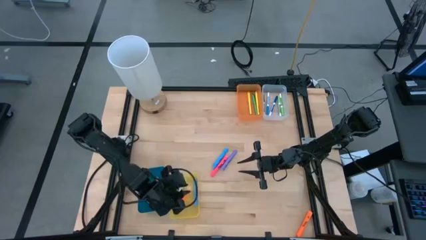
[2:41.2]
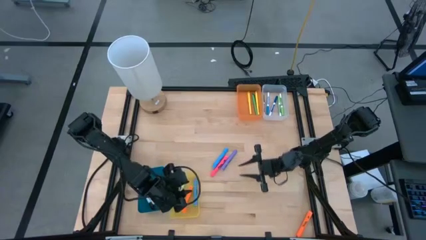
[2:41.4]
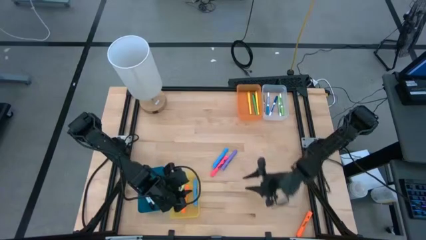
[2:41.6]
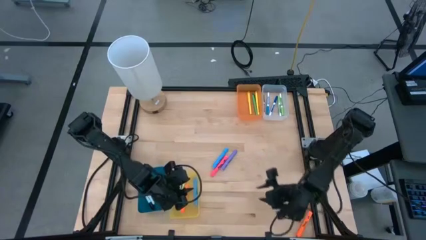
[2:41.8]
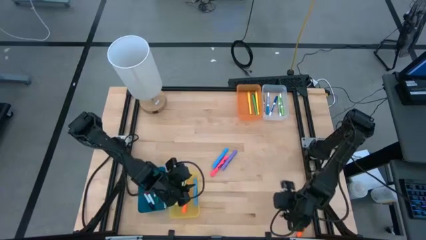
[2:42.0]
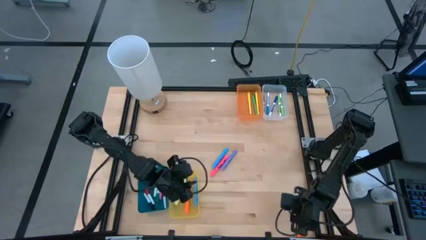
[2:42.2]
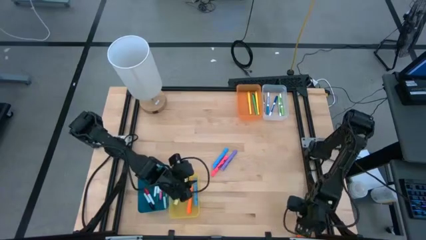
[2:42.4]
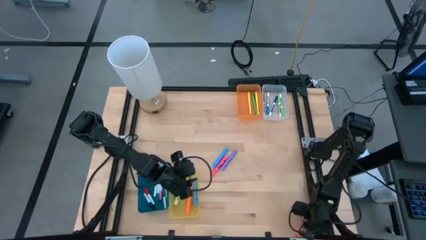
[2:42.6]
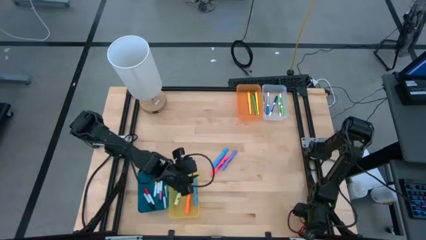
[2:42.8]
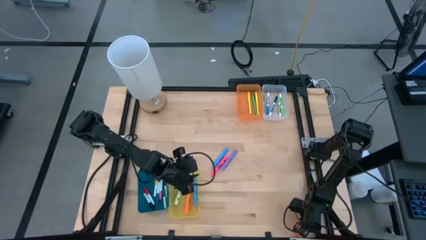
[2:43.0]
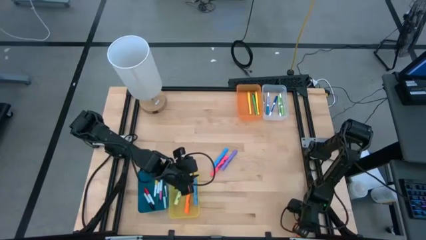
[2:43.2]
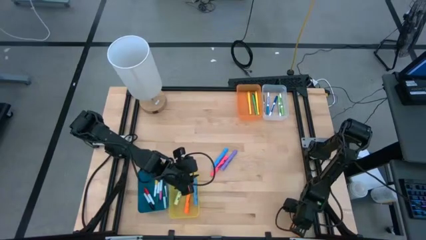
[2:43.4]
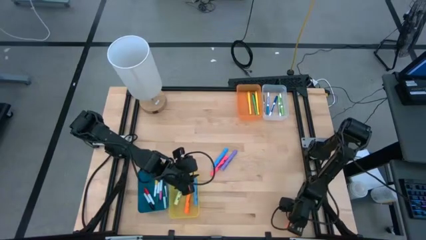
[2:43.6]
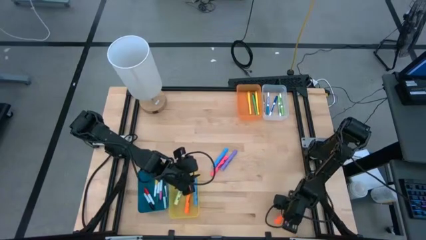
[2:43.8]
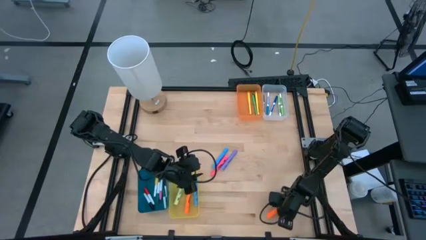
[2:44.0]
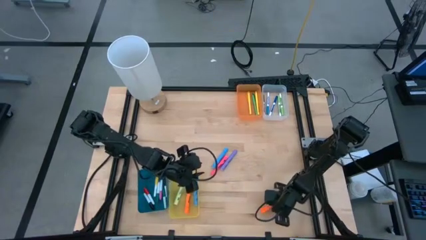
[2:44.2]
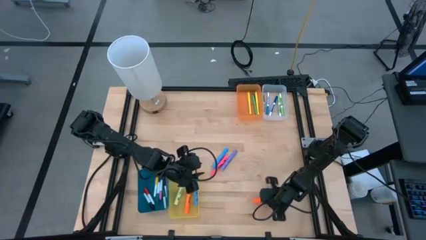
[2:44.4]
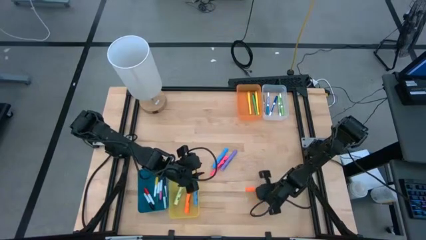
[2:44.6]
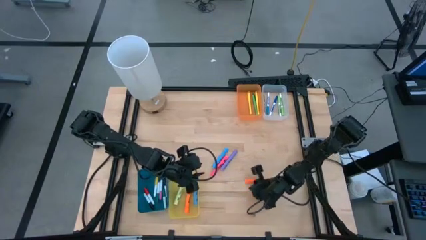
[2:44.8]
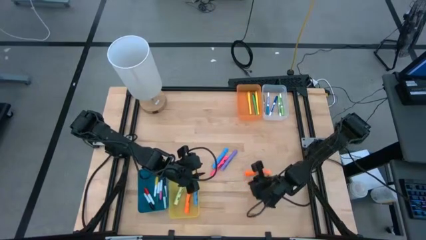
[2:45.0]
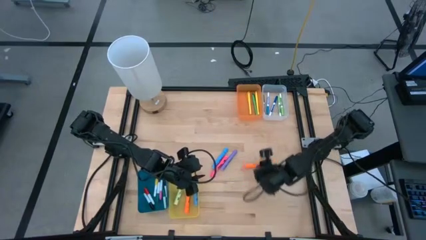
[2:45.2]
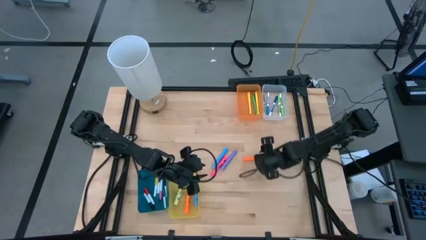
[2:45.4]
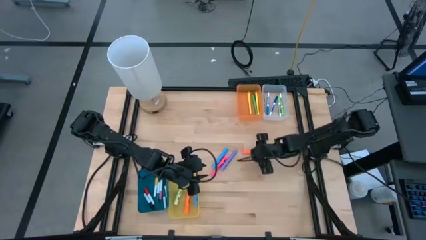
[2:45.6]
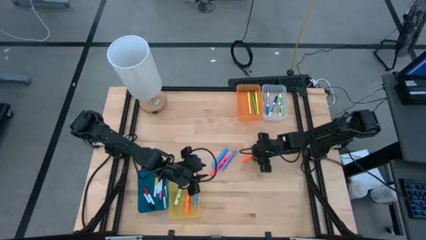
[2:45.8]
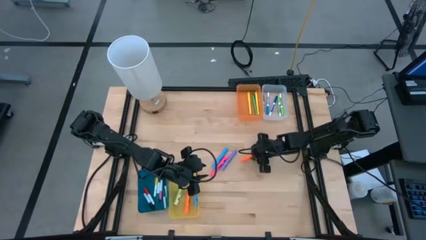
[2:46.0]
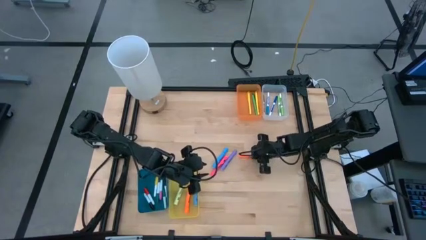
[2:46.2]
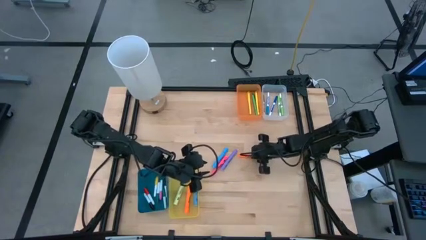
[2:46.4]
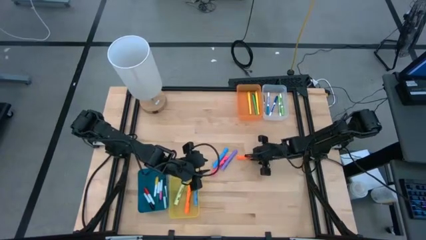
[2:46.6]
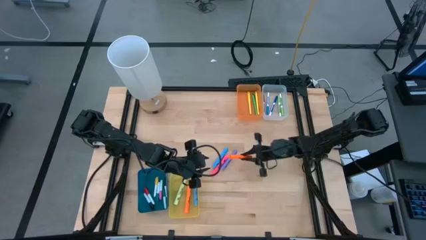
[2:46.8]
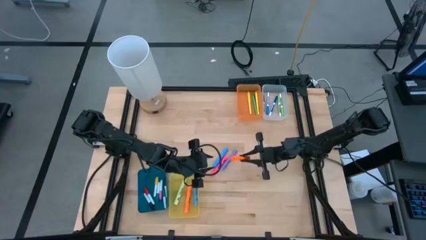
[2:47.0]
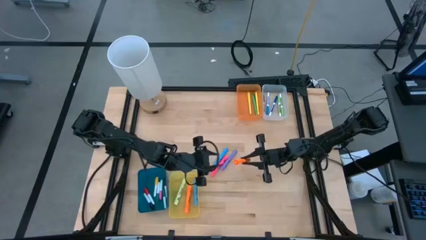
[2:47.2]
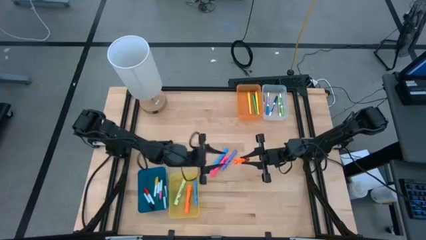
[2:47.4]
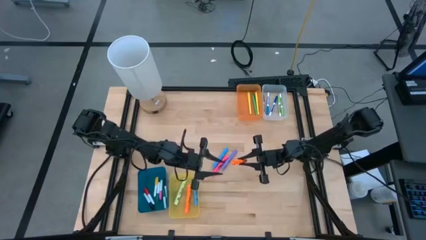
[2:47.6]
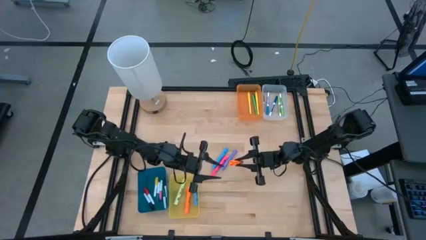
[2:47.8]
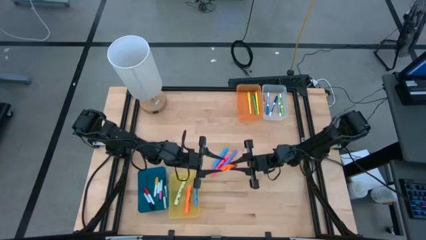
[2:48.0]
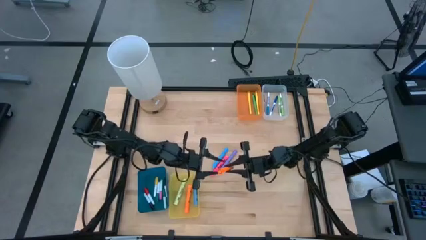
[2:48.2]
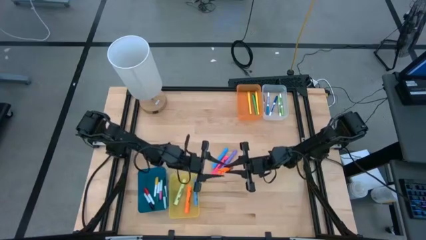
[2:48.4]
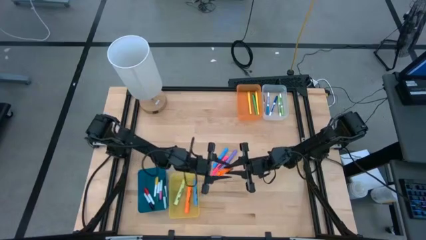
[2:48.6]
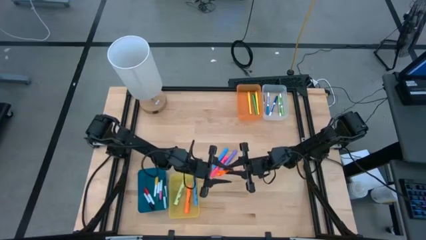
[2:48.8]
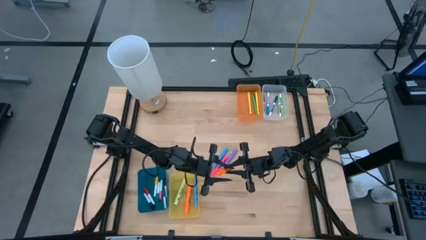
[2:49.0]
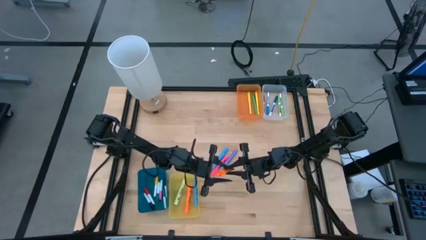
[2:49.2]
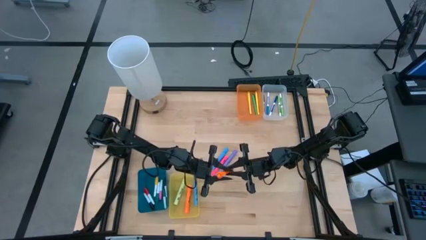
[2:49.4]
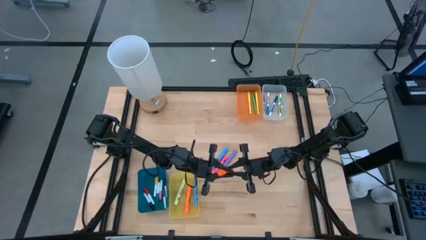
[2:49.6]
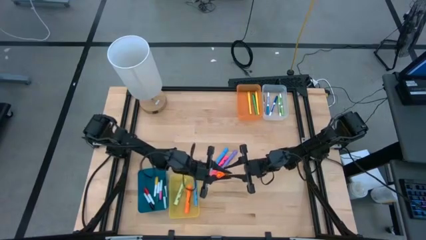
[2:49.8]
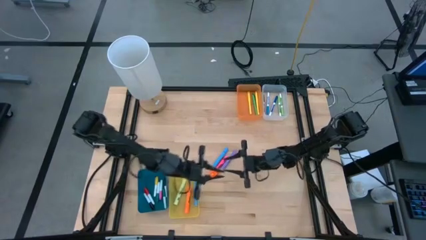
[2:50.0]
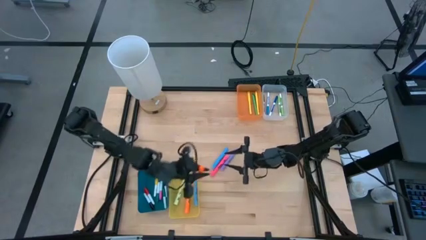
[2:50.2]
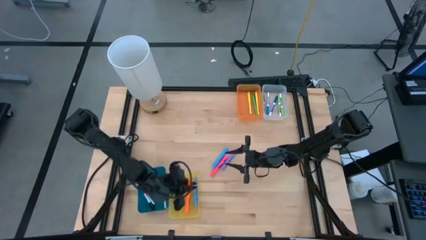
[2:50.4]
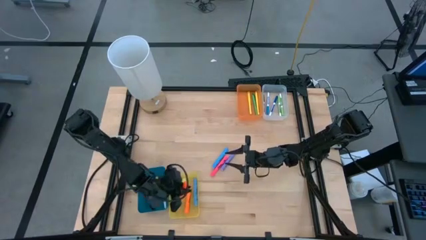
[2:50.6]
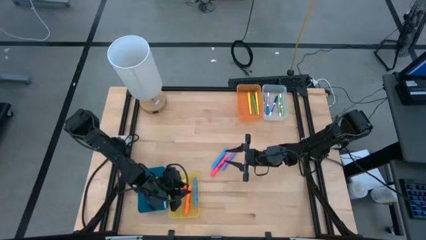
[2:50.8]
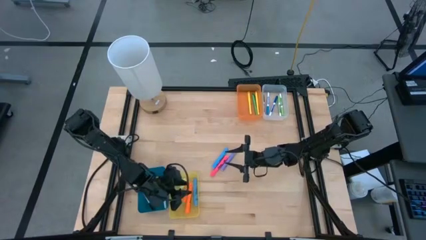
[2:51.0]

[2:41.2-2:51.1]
Task: Pick & Place Markers
Put the orange highlighter pen into the yellow bin

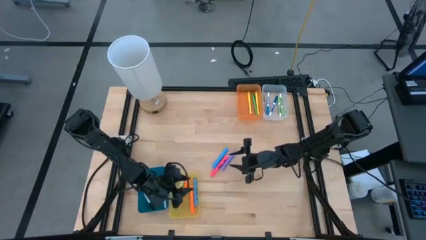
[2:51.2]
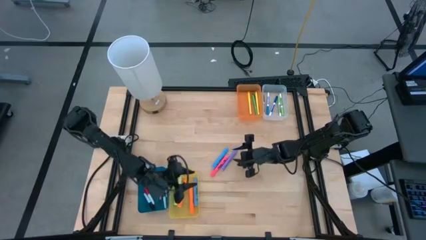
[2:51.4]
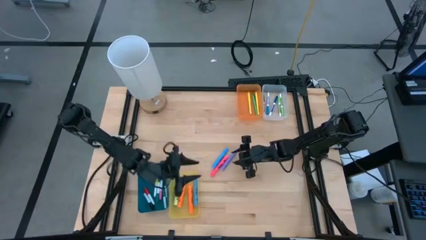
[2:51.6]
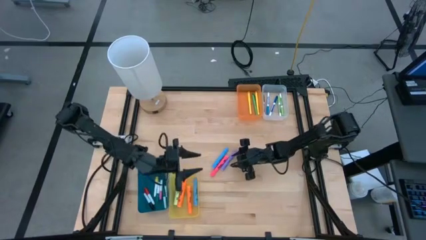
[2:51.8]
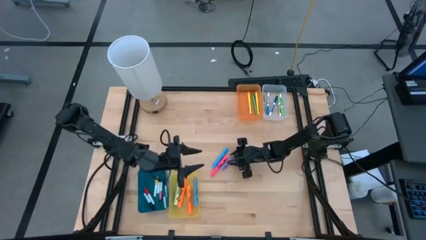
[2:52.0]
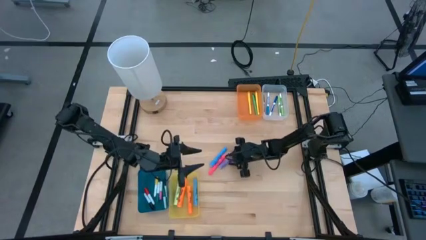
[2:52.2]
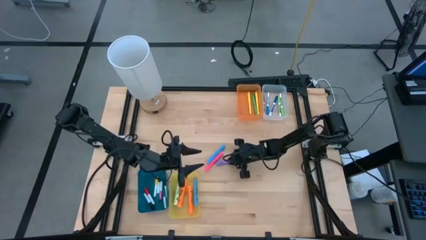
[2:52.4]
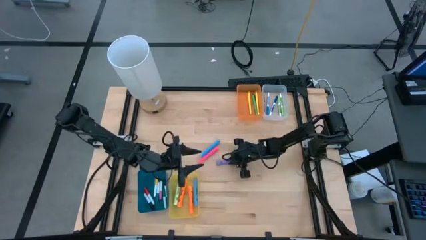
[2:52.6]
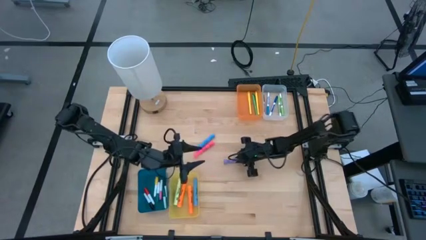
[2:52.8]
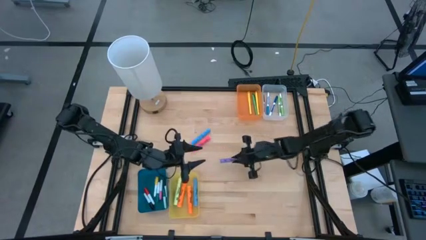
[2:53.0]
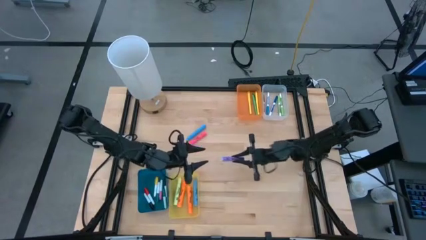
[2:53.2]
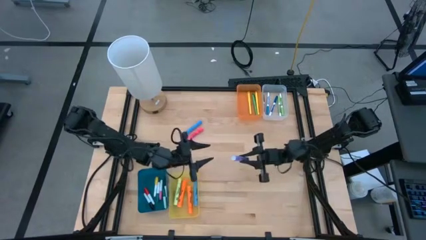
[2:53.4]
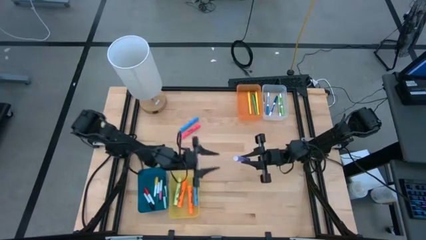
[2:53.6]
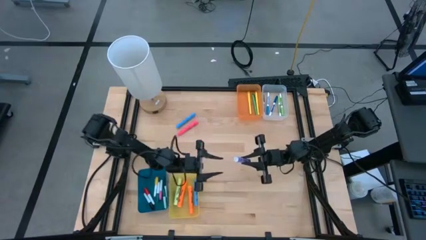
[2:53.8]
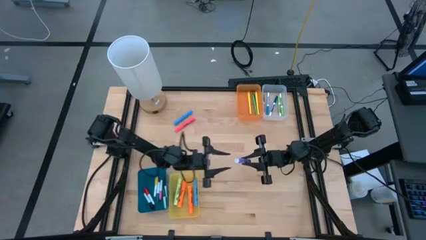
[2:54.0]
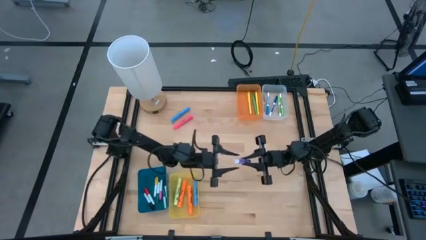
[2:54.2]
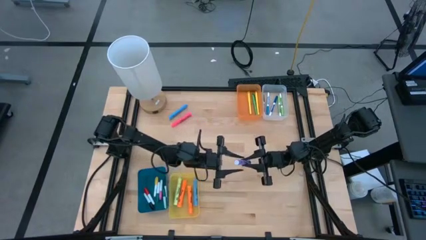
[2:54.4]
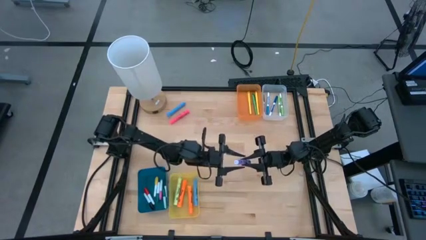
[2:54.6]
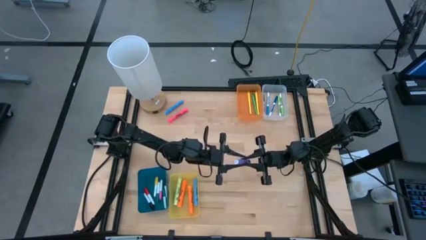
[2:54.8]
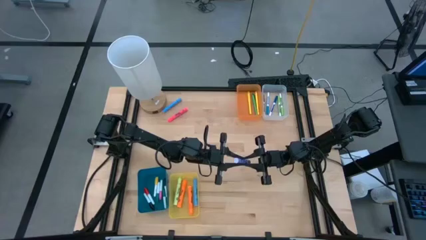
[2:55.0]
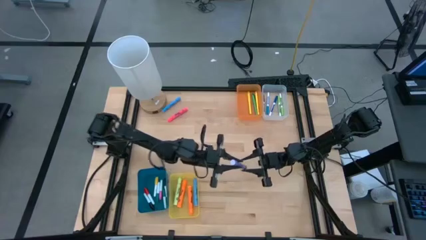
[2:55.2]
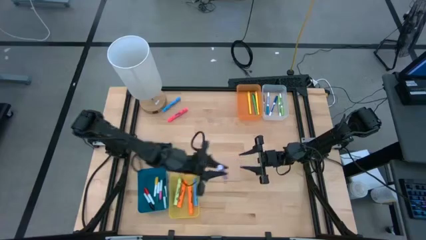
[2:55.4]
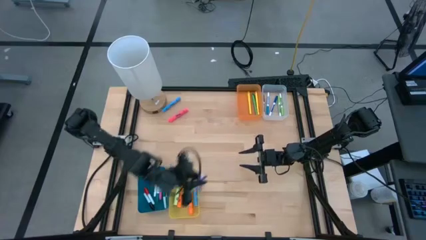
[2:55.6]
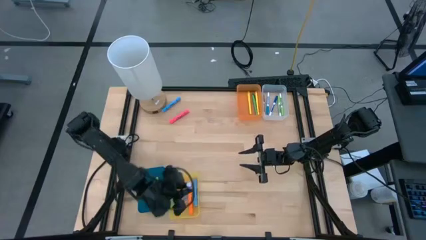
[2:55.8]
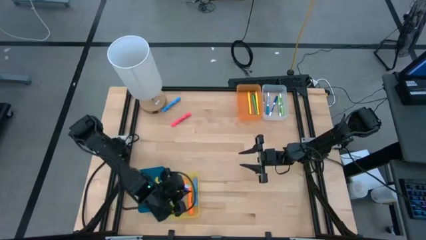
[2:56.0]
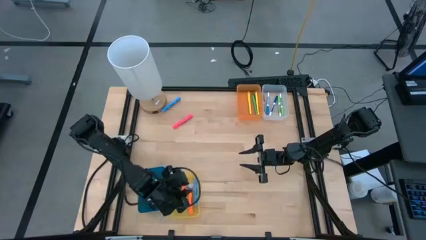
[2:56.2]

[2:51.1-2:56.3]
Put the purple highlighter pen into the yellow bin
